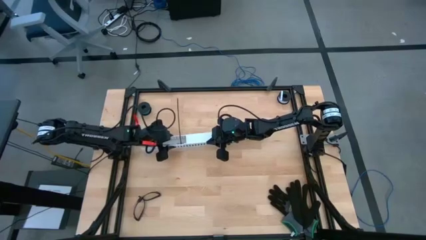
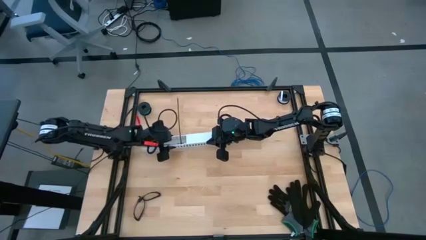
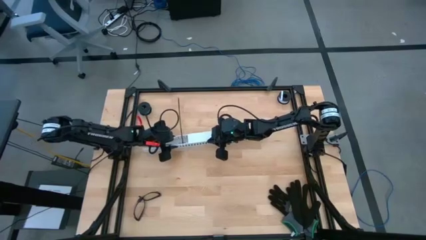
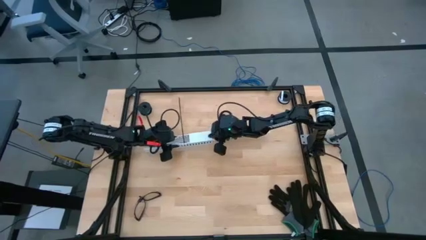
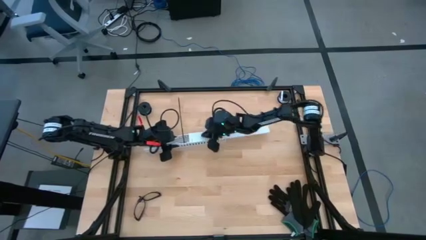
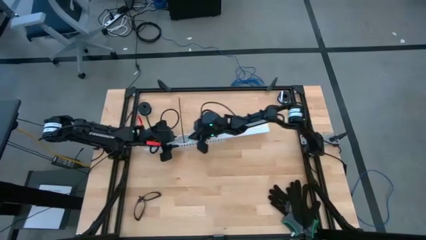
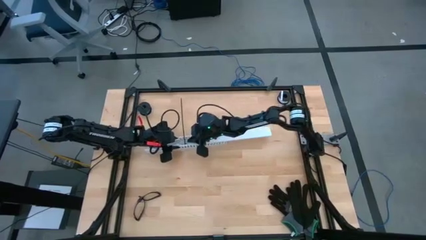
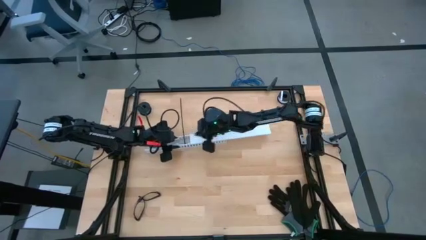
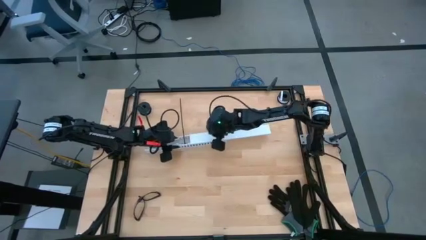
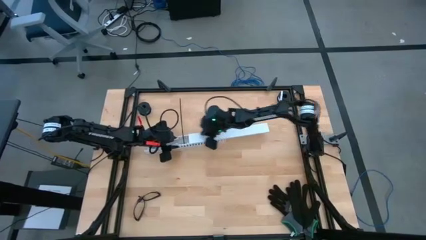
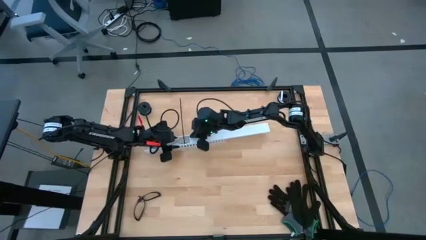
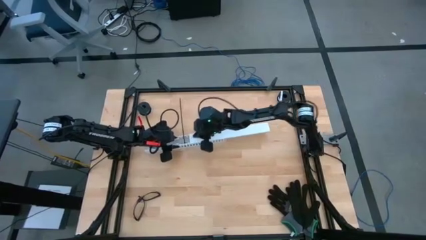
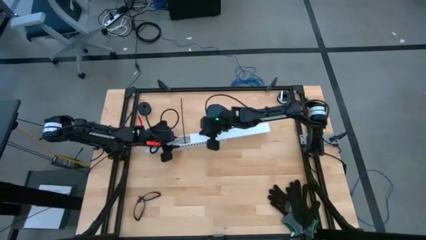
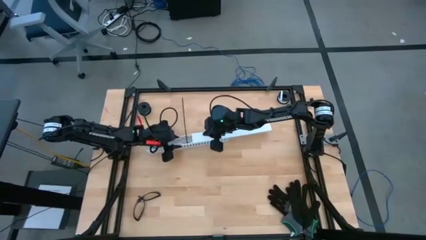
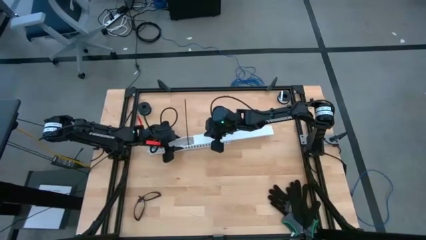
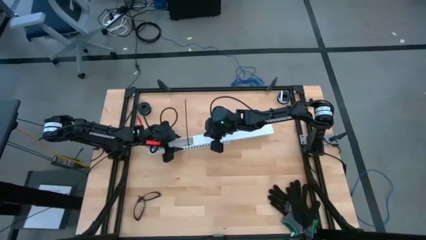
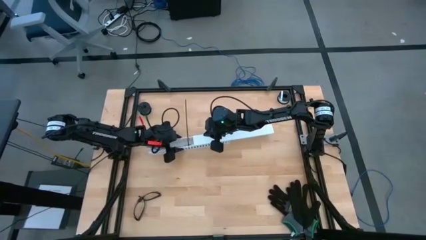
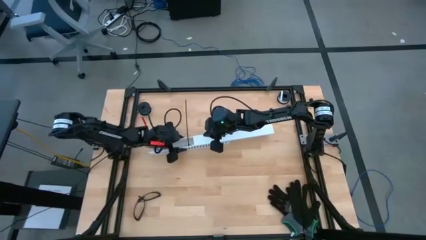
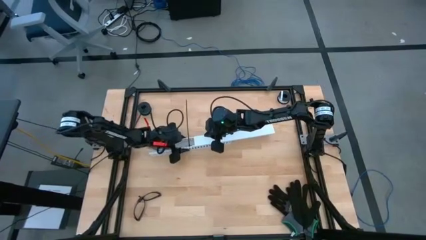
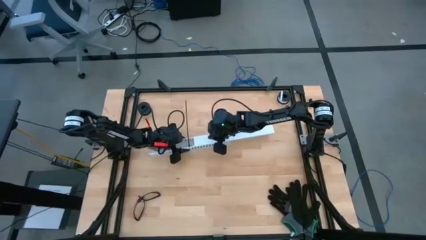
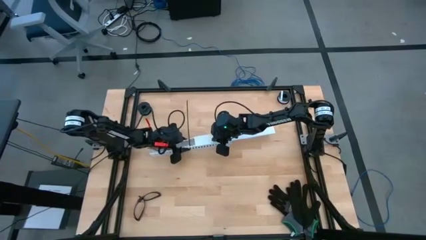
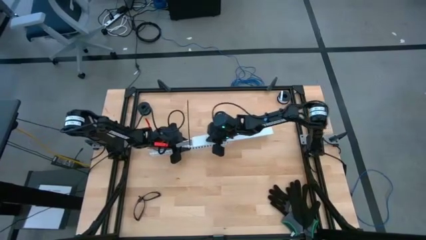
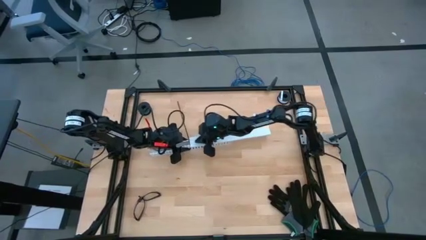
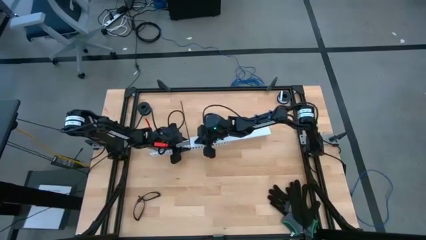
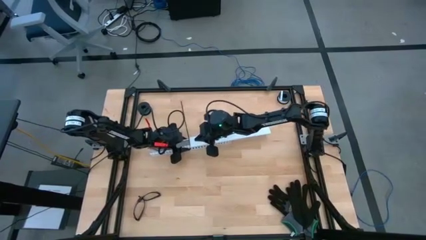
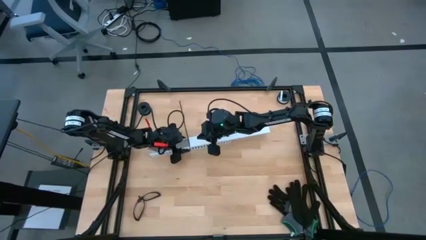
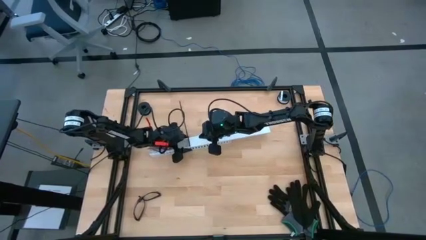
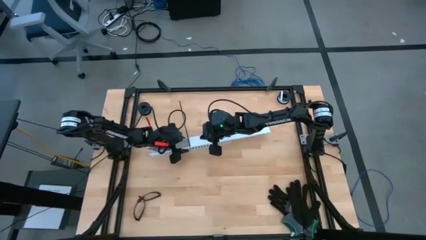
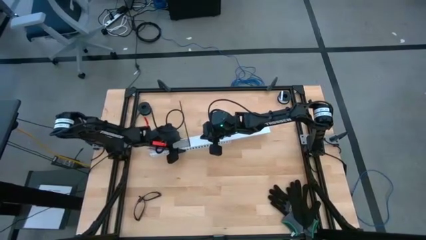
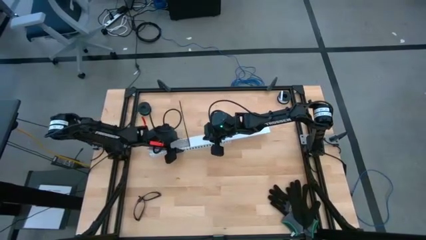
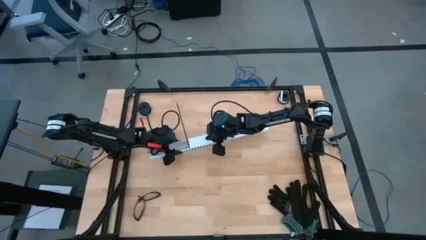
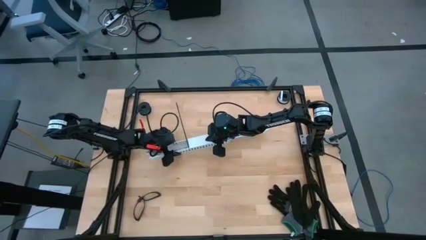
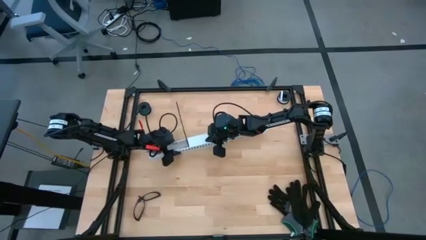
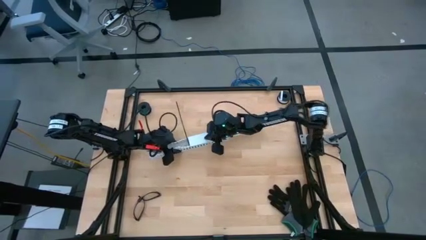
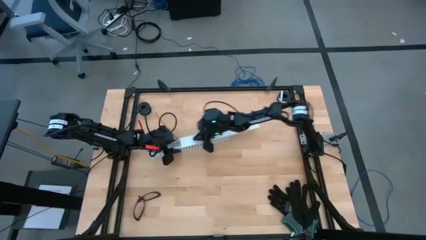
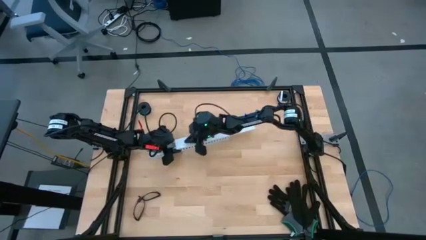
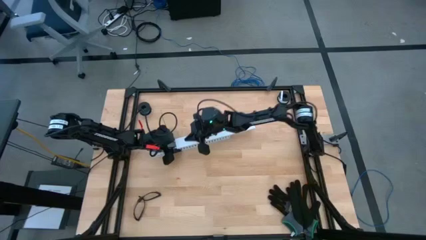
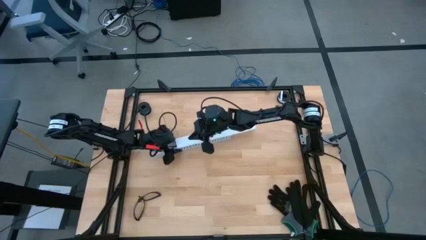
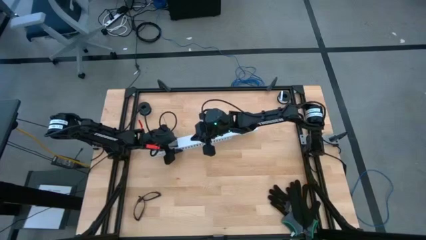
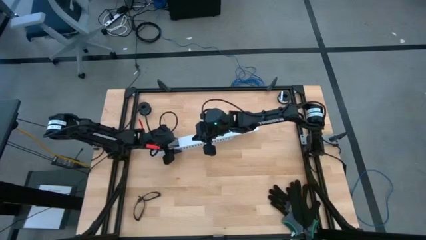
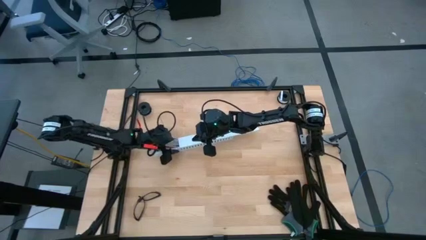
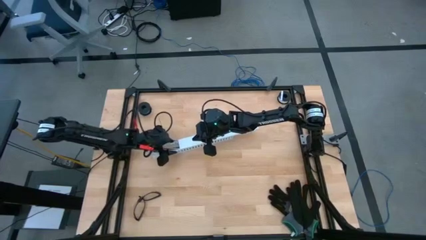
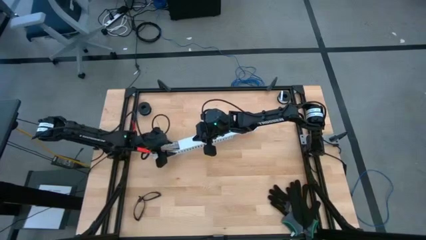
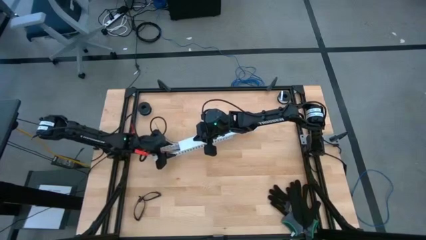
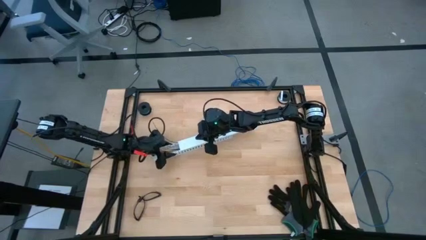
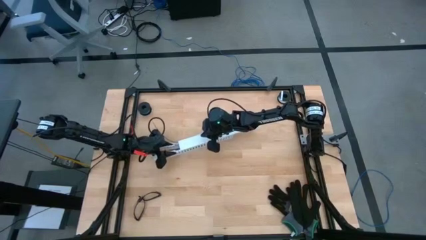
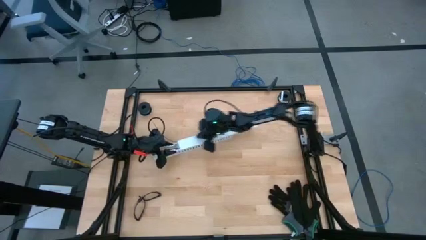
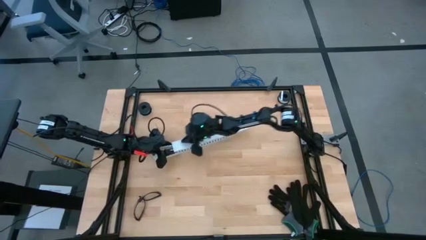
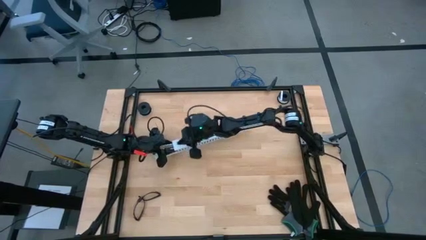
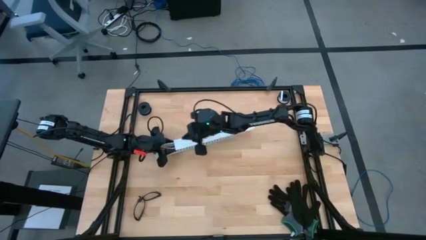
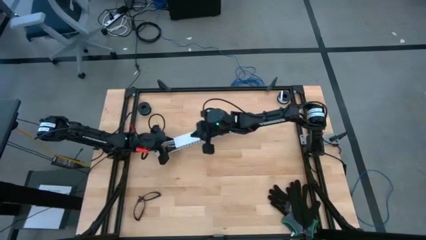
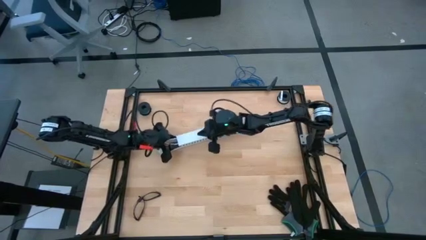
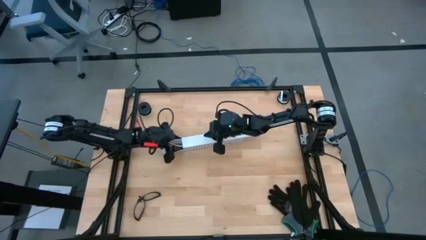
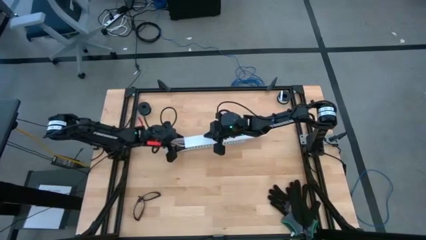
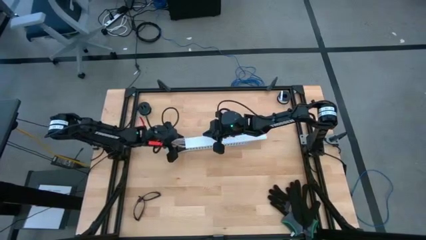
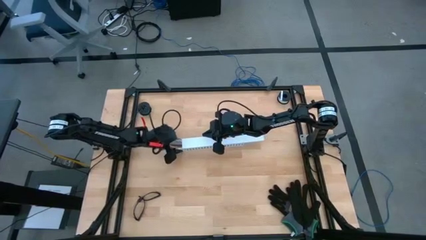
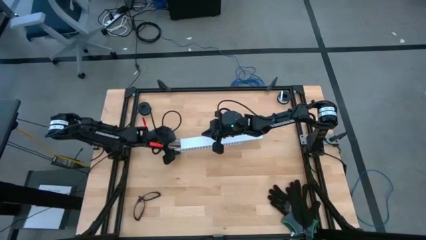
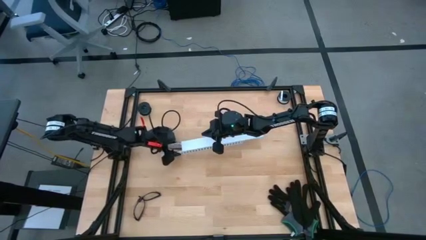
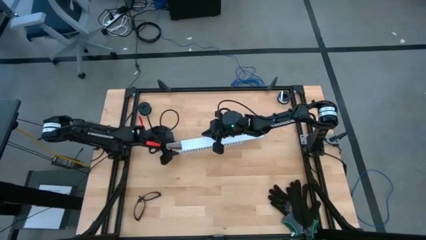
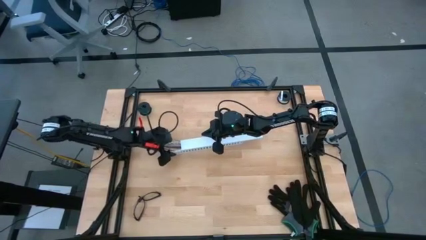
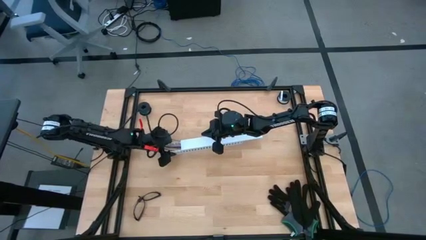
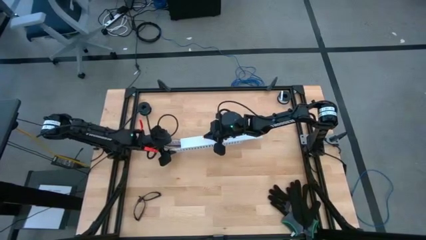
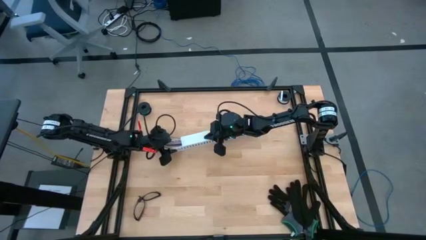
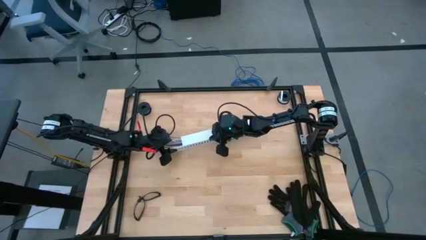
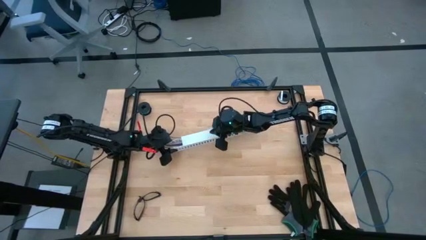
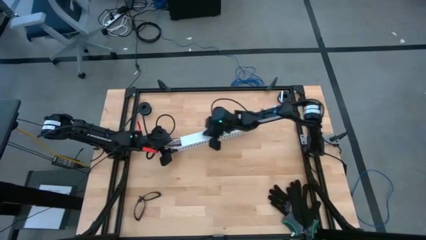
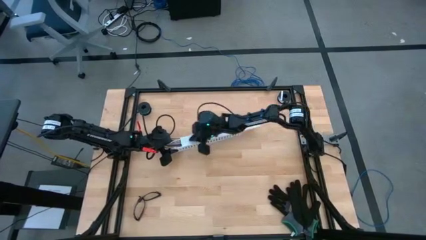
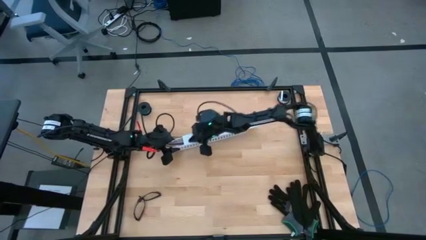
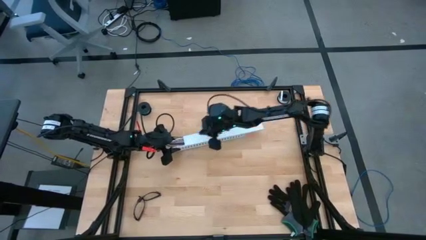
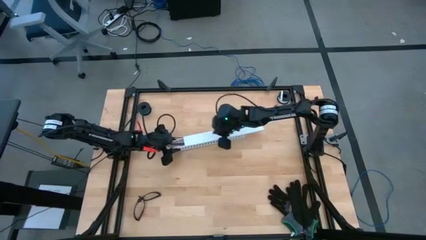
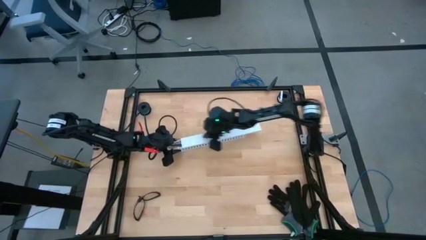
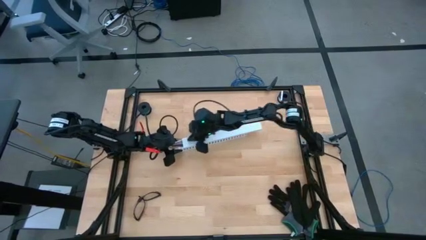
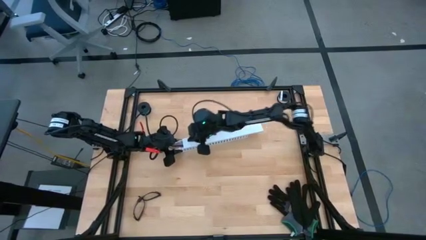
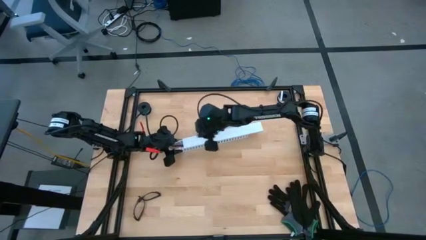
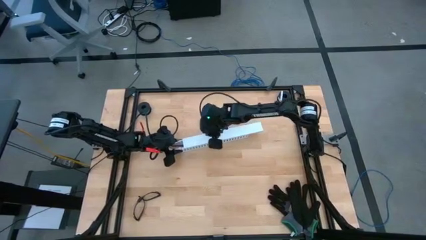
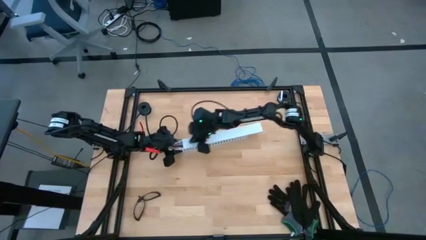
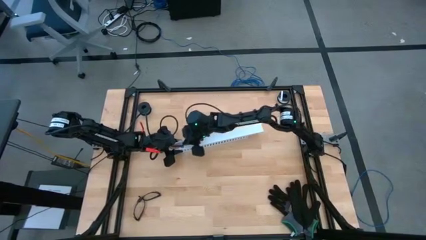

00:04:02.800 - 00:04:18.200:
Task: Ziptie cables
Close the white cable duct using the cover

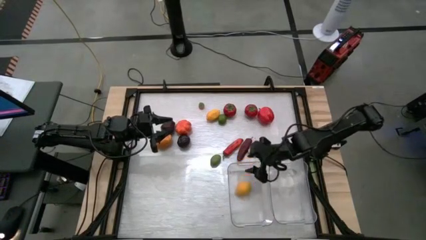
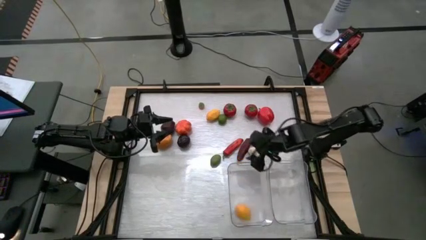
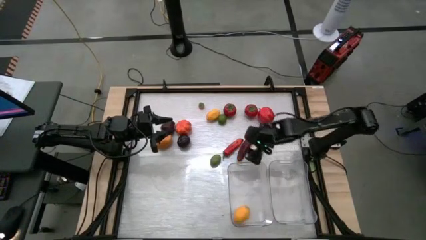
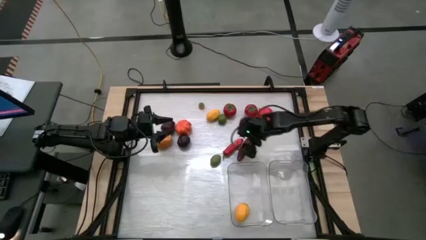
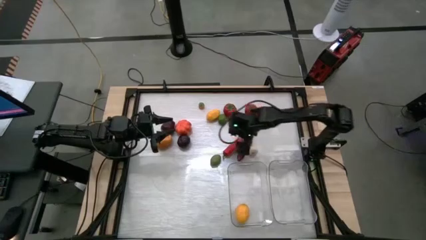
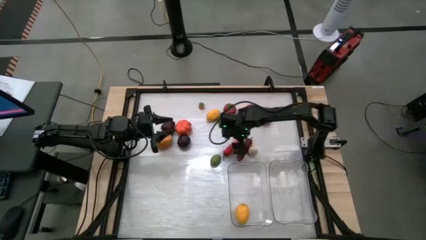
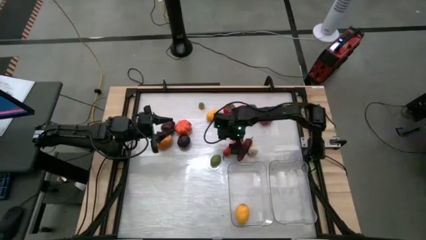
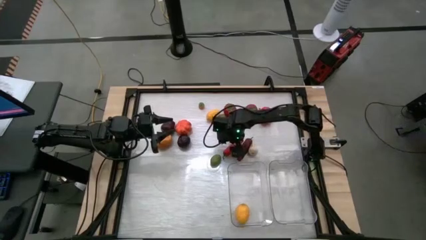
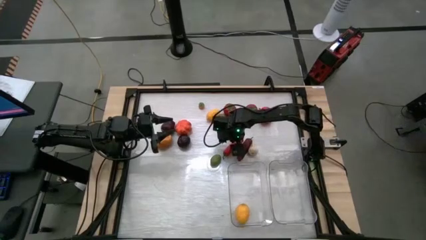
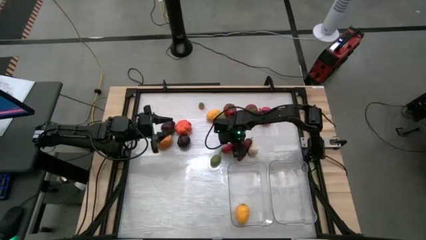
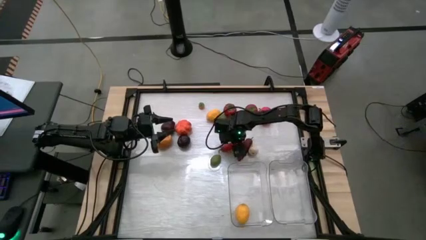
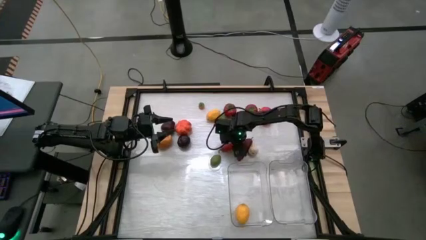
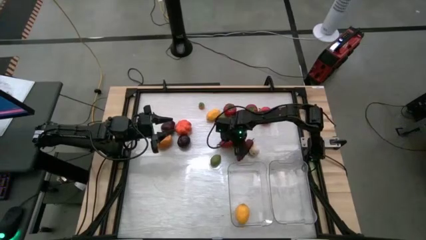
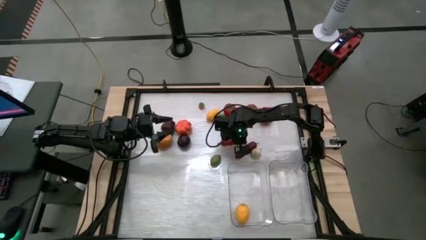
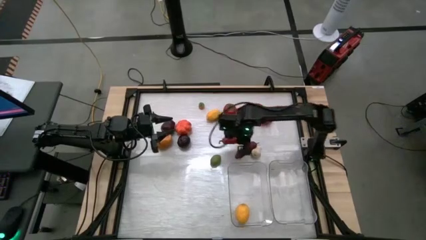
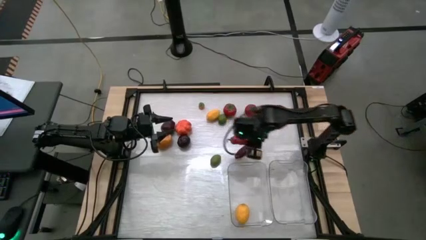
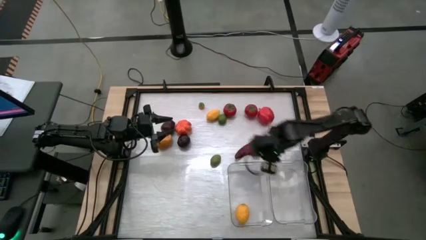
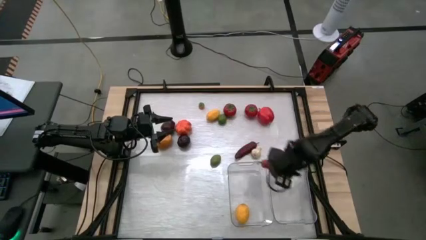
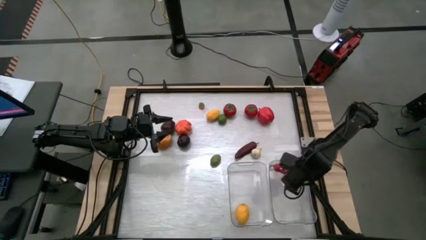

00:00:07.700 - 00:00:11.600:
Task: Sort produce into baskets
Put the red chili pepper into the right transparent bin
